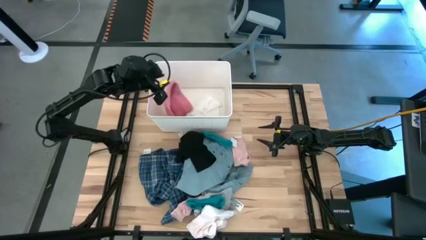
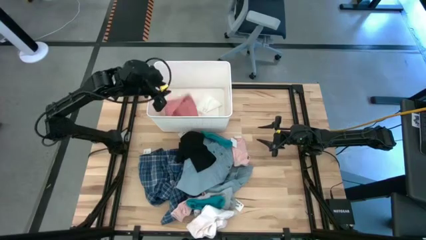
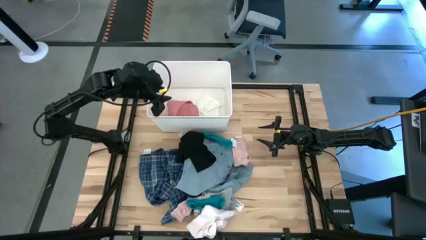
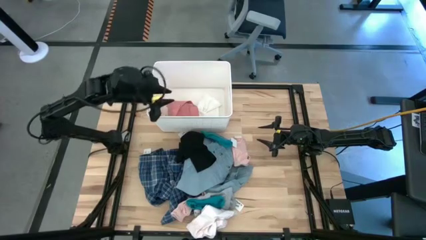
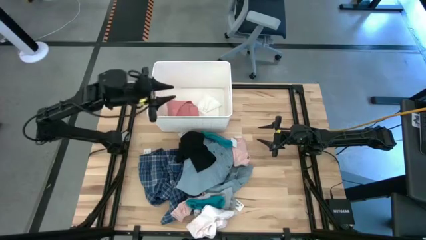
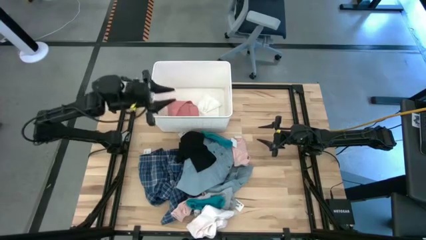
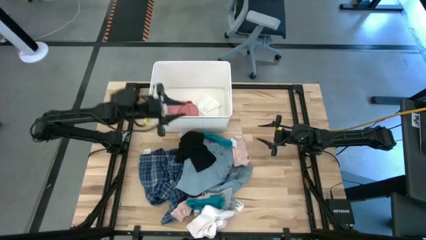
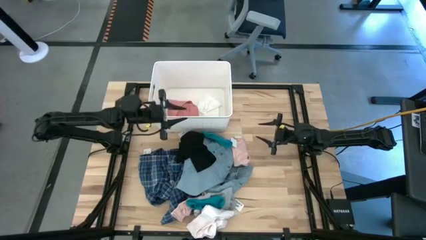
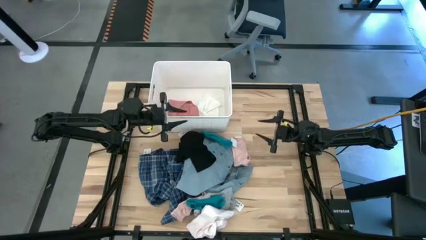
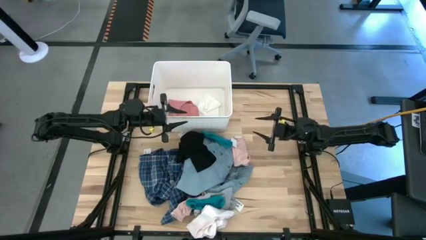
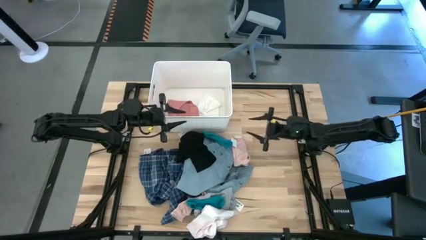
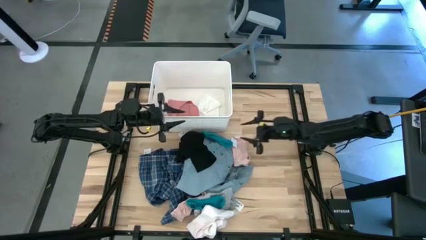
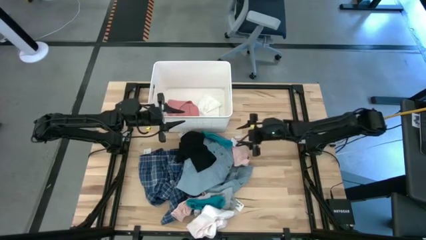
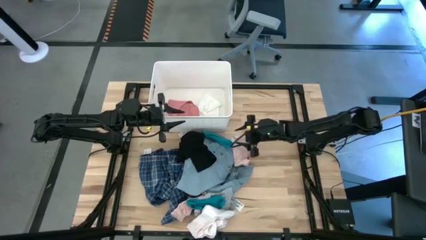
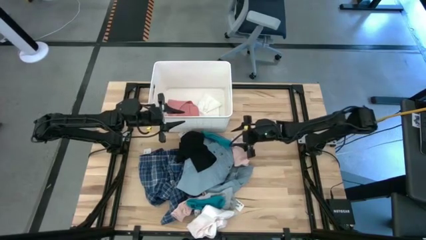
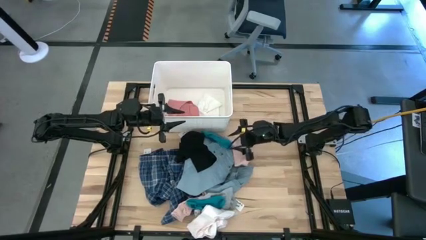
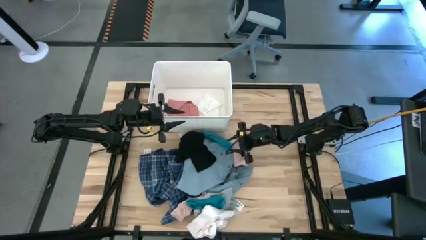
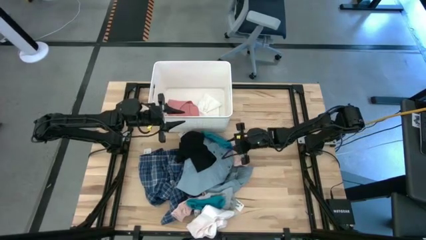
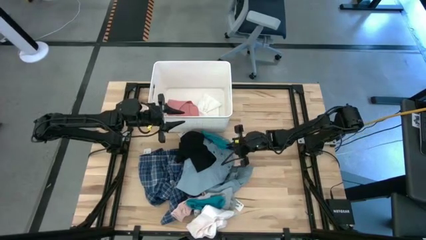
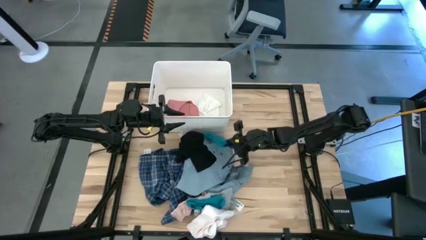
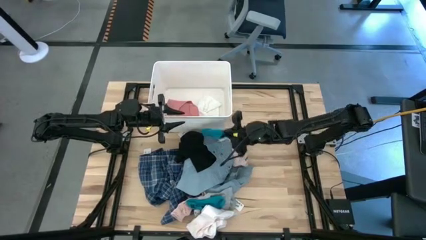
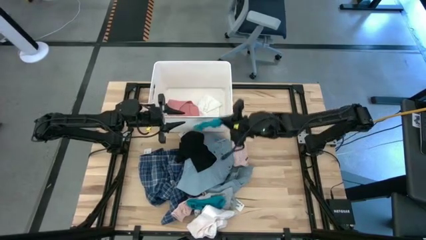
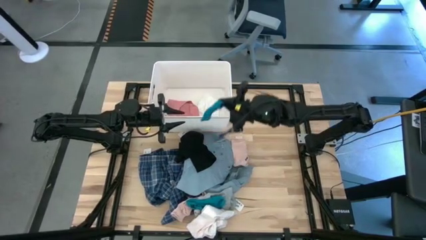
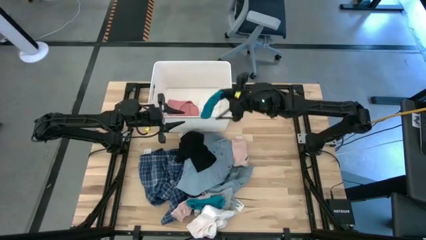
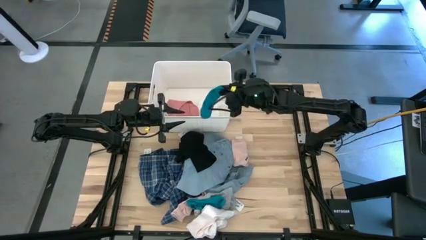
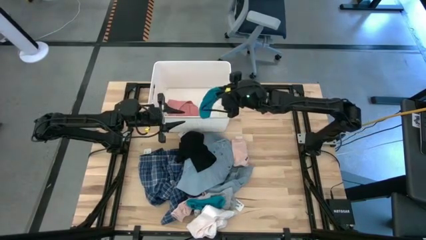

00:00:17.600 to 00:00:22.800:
Task: Sort clothes
Put the top blue sock into the white bin

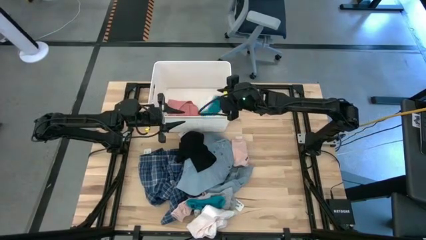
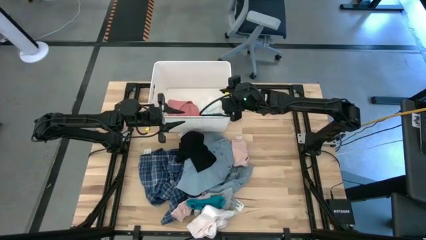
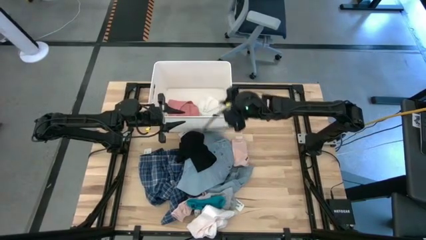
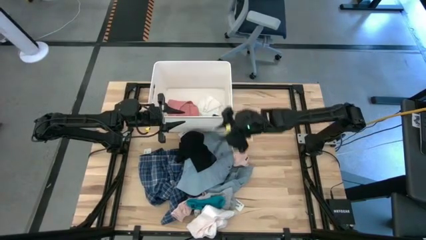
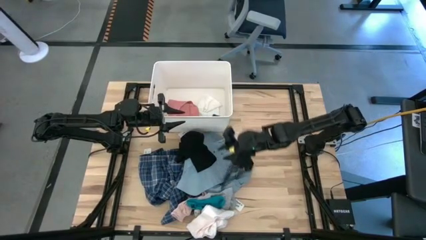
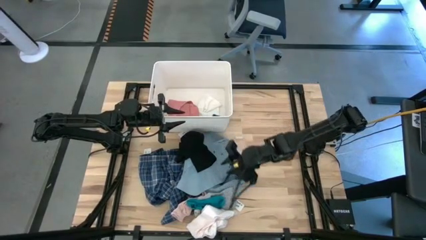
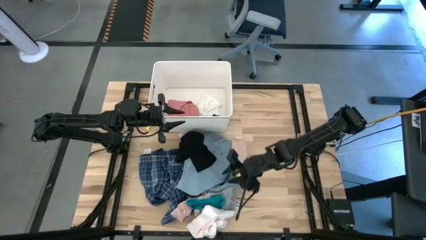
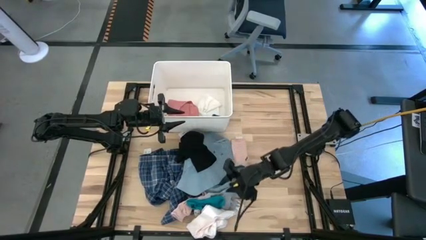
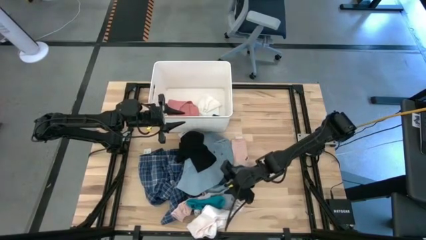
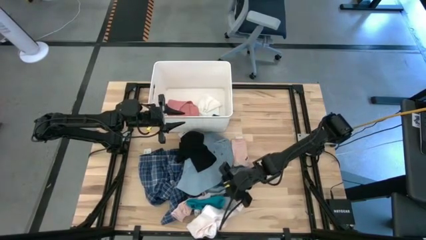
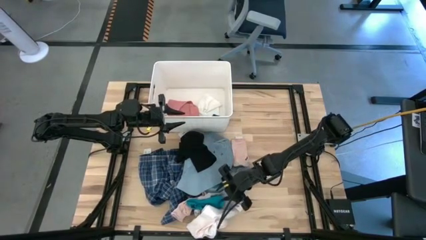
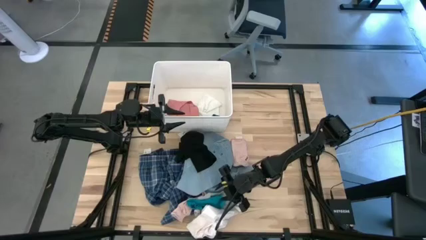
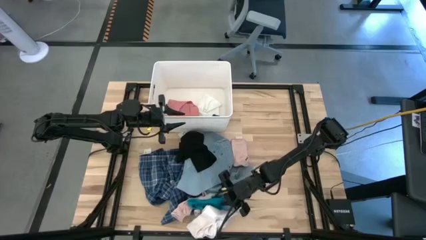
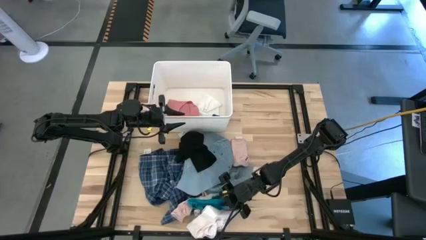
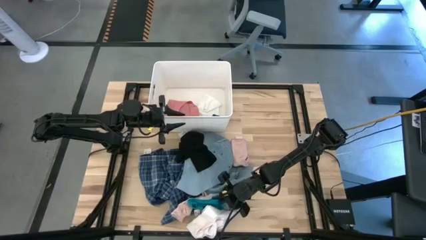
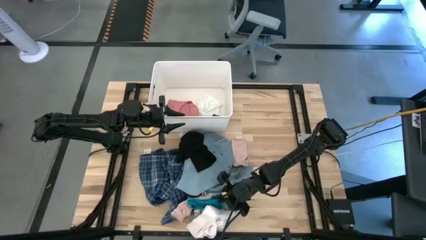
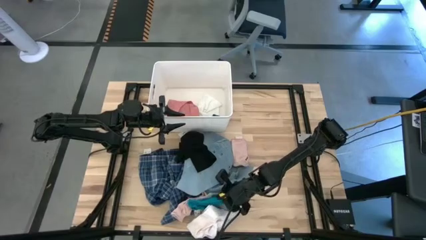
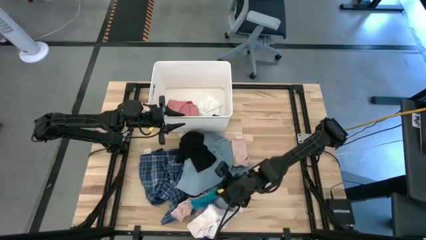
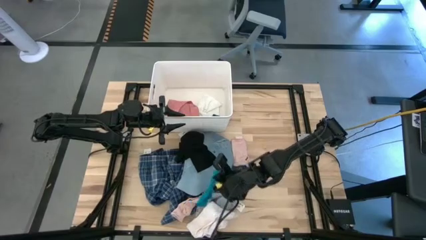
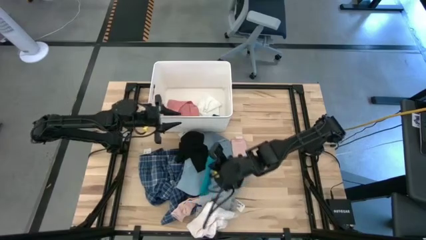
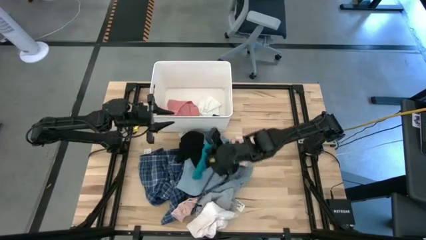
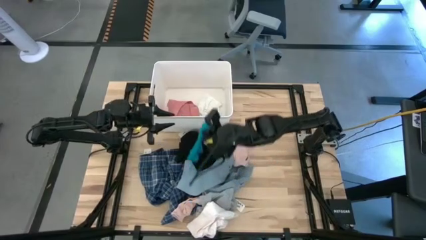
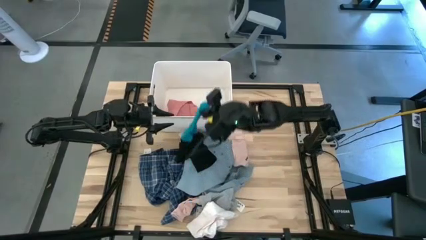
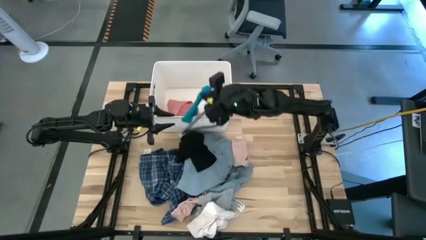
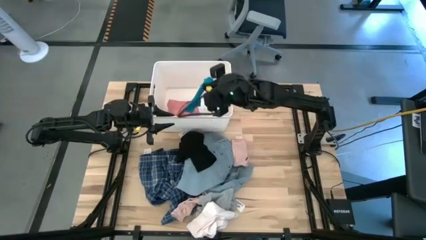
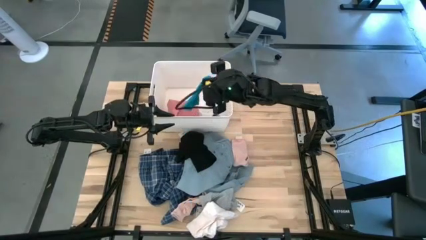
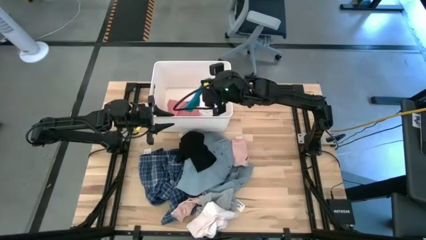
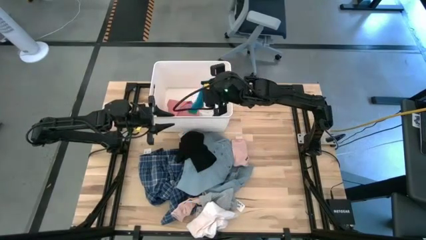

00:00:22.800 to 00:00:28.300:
Put the blue sock into the white bin

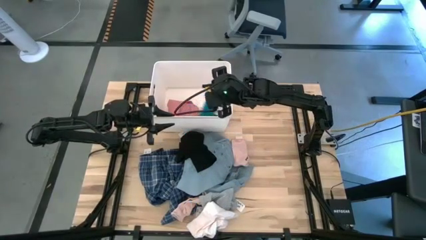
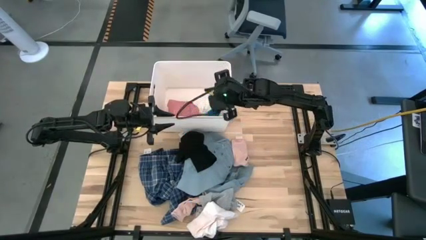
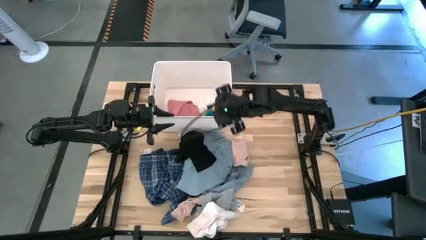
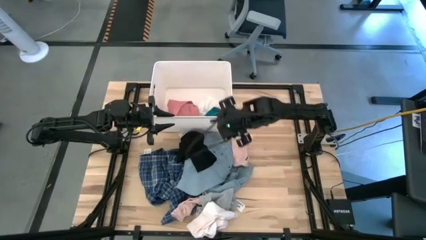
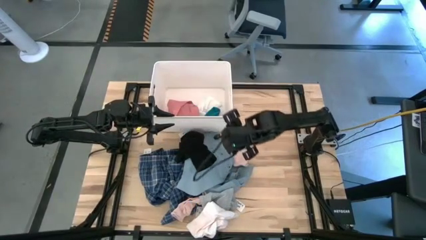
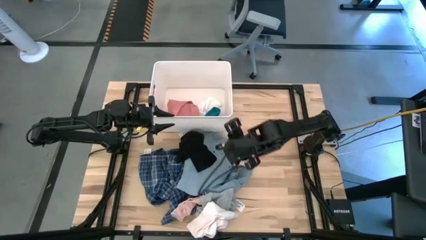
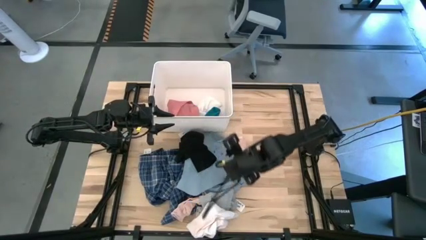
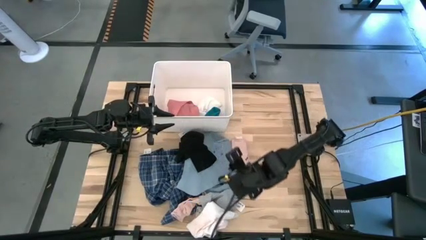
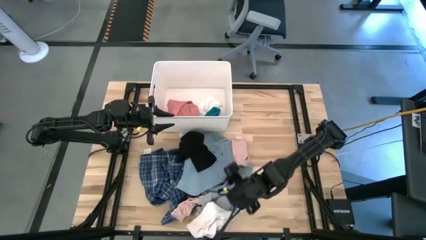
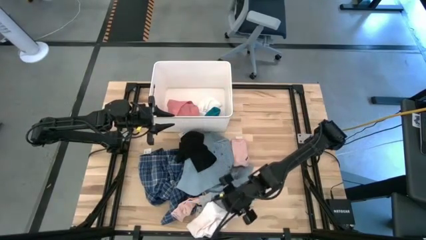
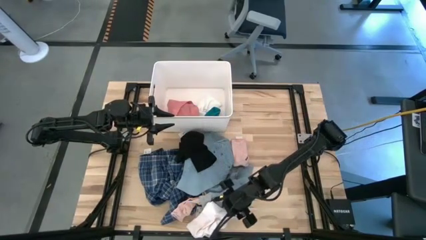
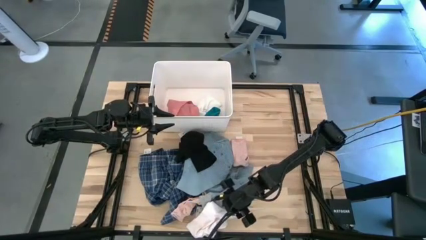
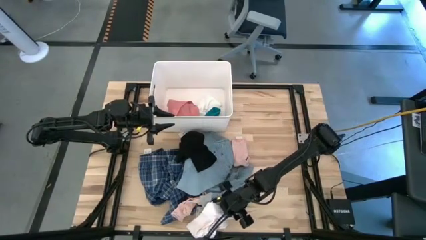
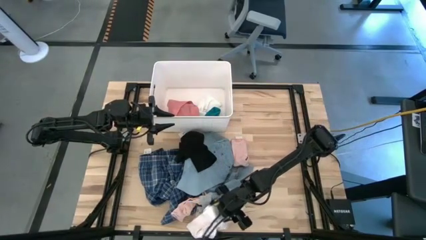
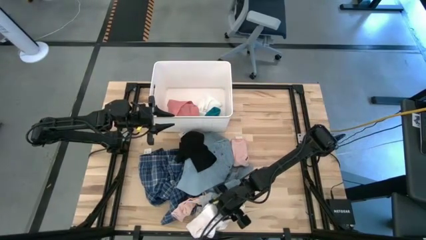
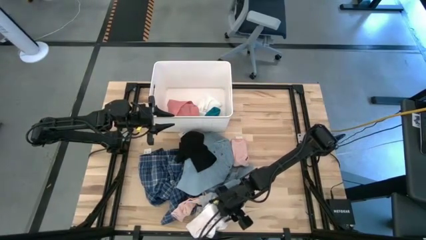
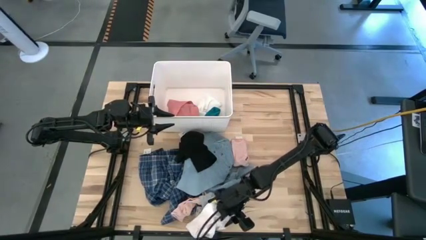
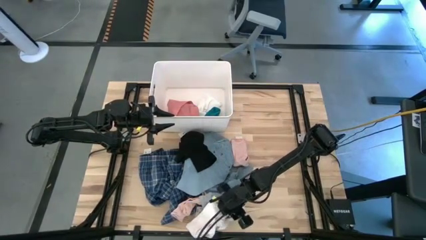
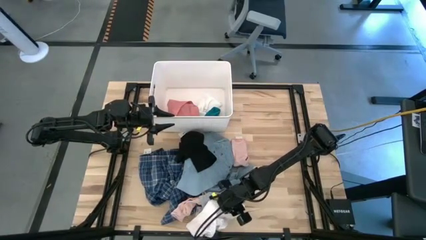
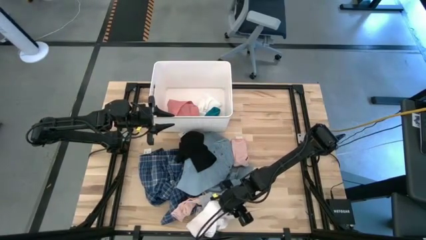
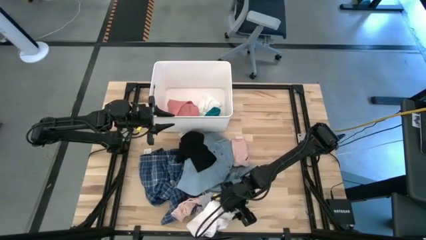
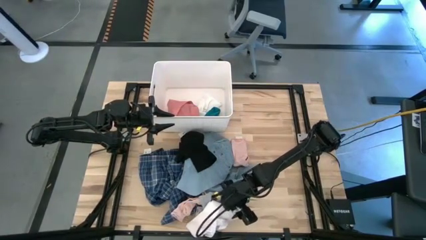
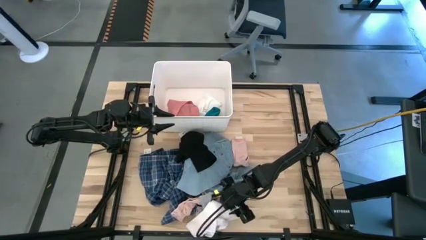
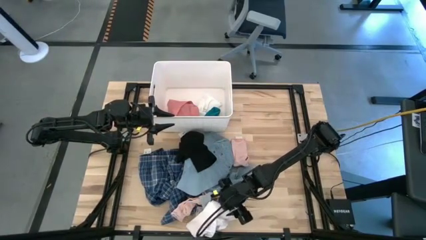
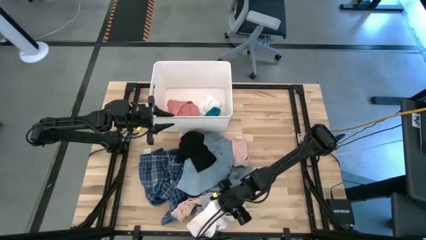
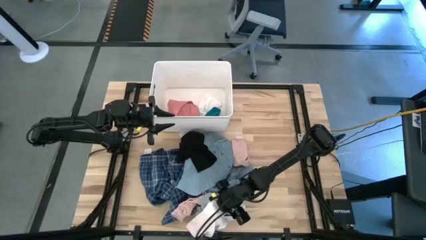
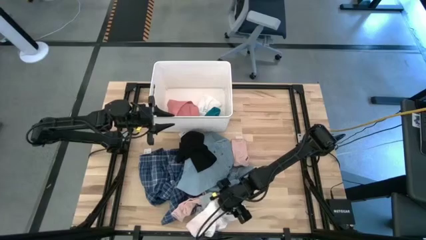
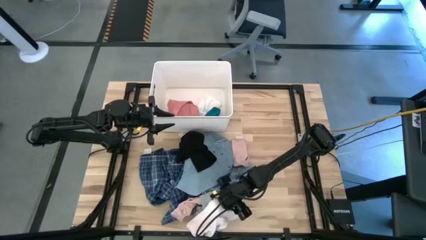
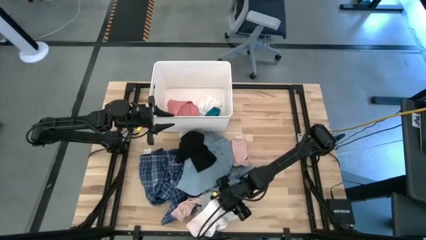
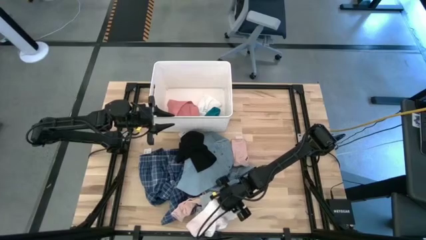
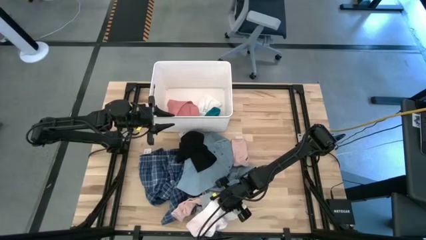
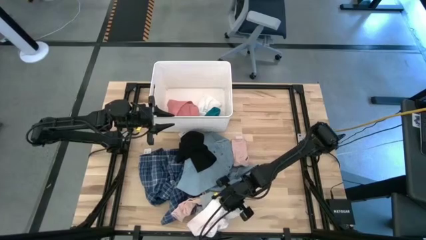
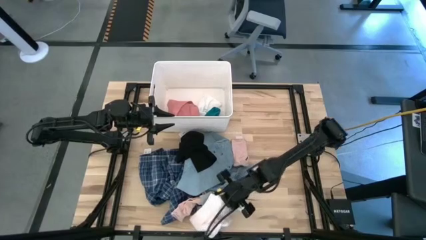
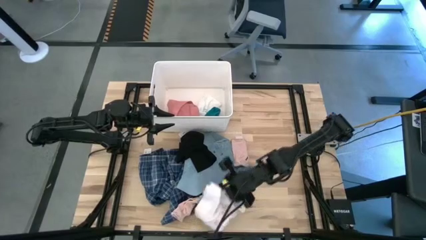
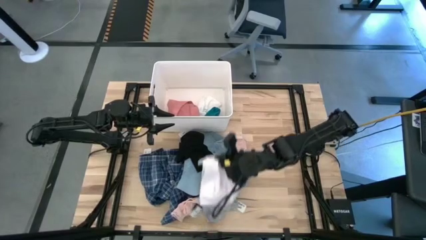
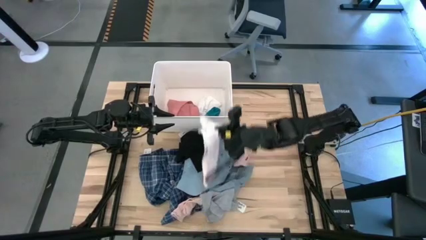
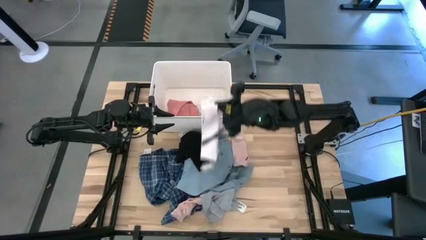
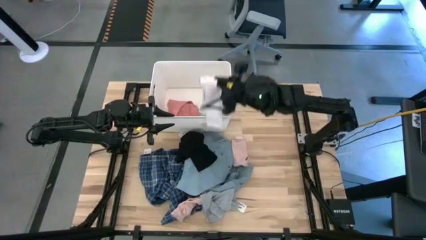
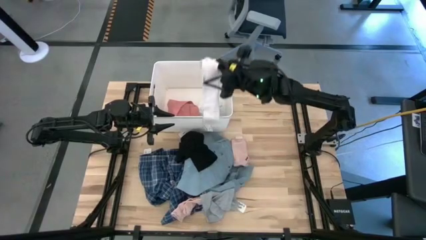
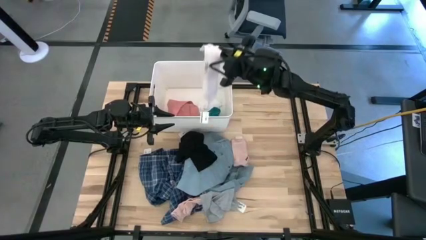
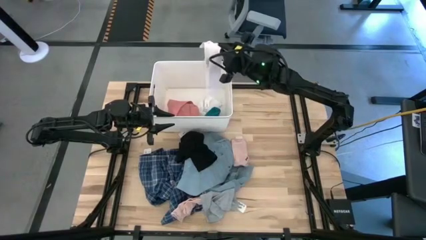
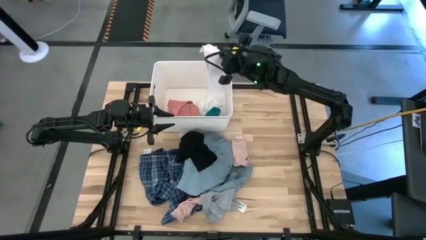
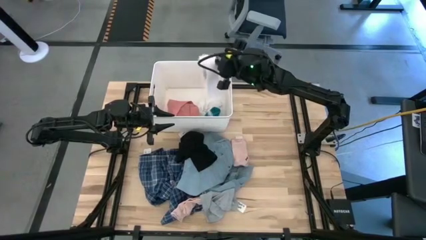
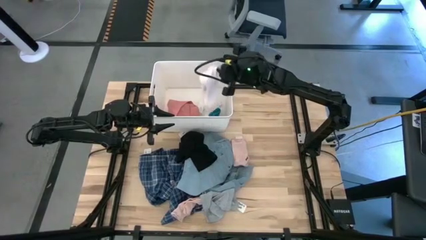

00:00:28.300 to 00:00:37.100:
Put the light pink underwear into the white bin
